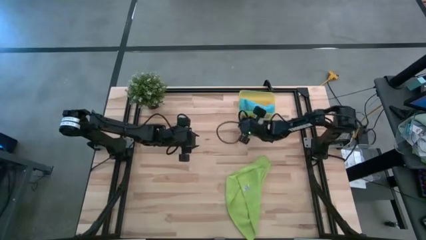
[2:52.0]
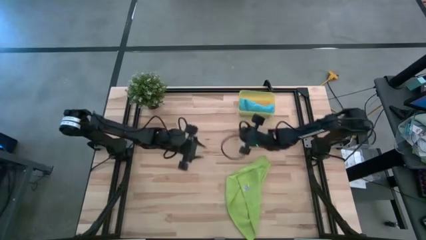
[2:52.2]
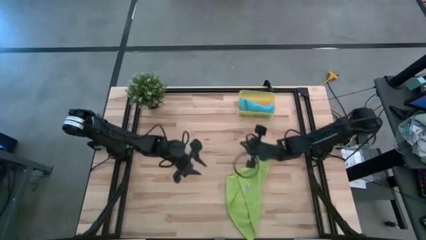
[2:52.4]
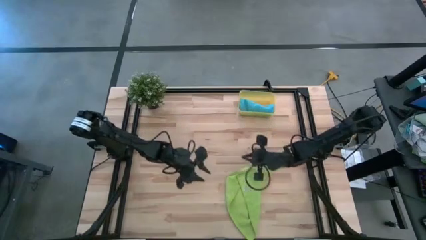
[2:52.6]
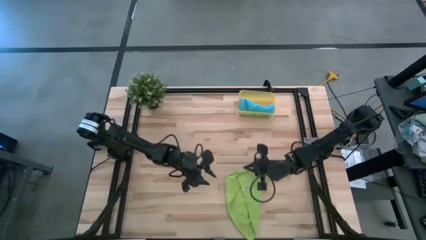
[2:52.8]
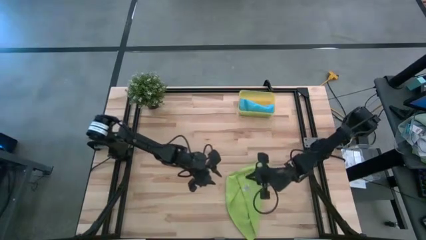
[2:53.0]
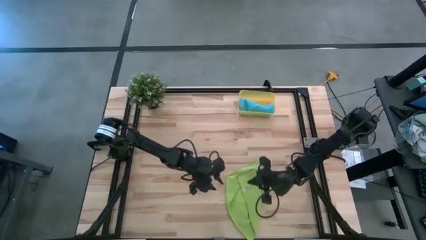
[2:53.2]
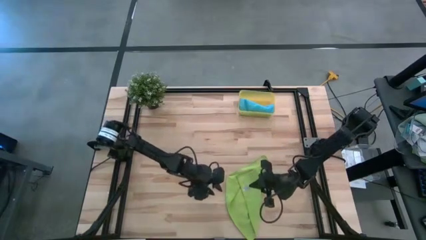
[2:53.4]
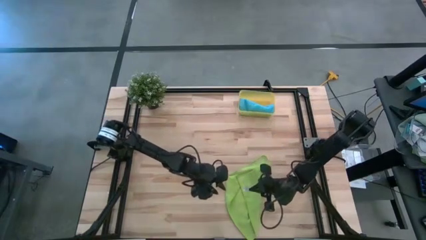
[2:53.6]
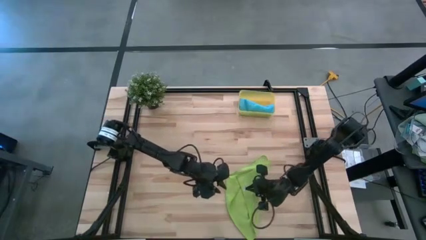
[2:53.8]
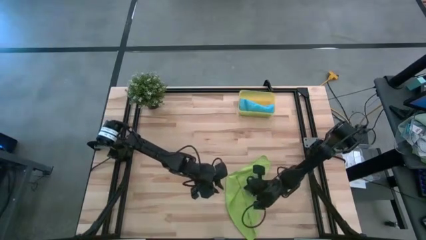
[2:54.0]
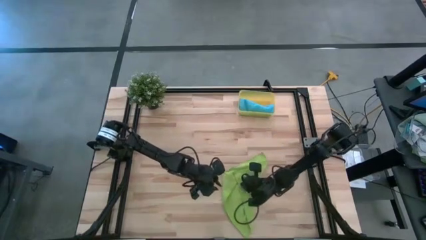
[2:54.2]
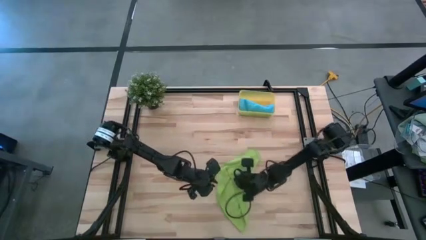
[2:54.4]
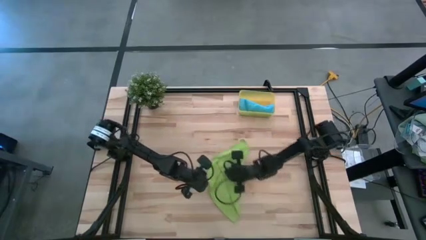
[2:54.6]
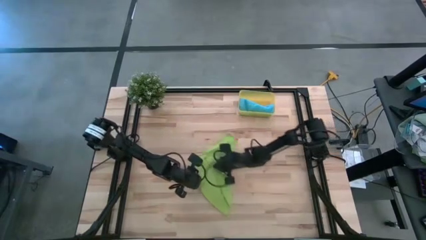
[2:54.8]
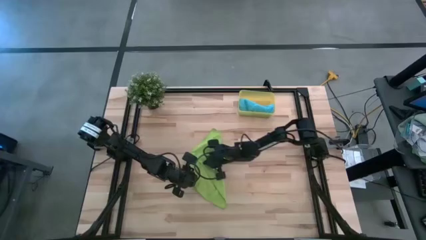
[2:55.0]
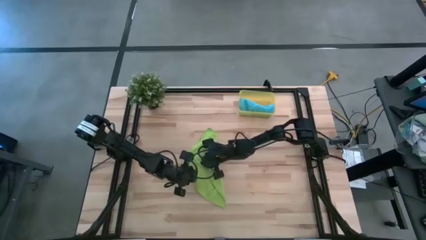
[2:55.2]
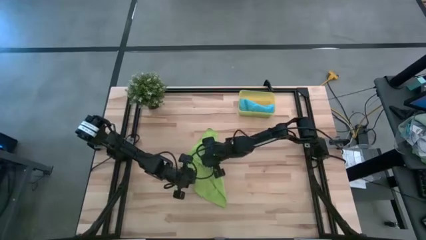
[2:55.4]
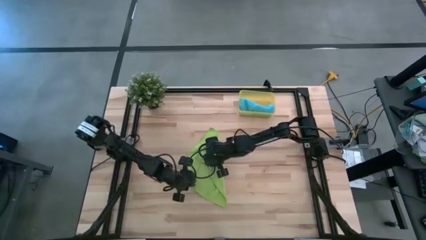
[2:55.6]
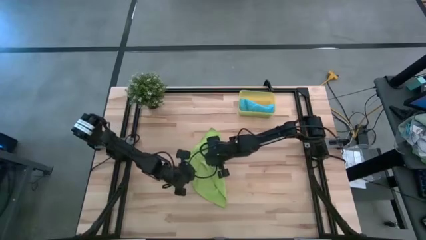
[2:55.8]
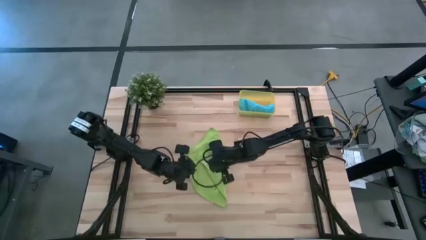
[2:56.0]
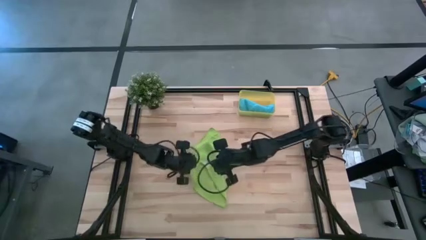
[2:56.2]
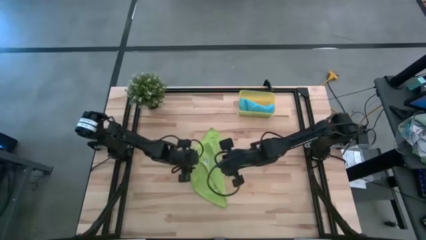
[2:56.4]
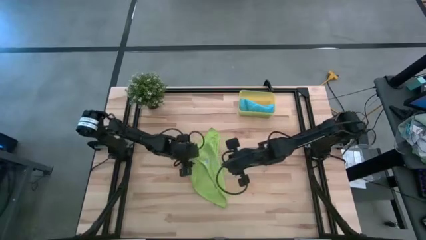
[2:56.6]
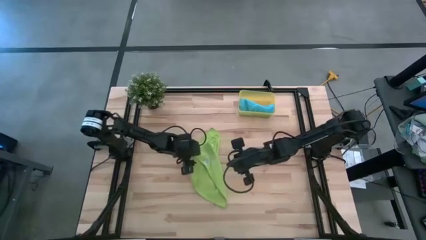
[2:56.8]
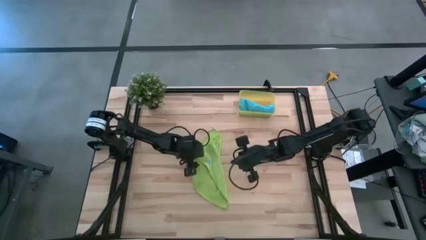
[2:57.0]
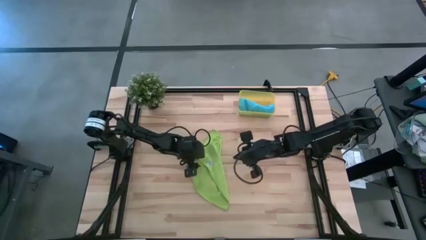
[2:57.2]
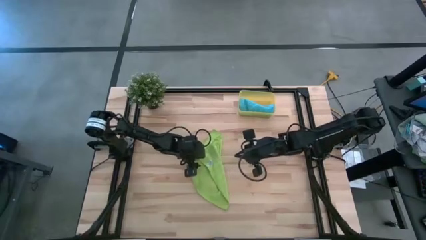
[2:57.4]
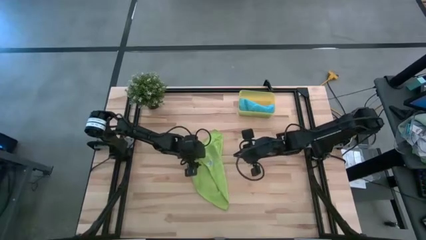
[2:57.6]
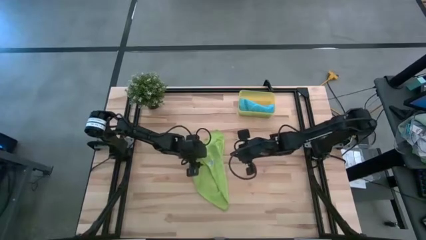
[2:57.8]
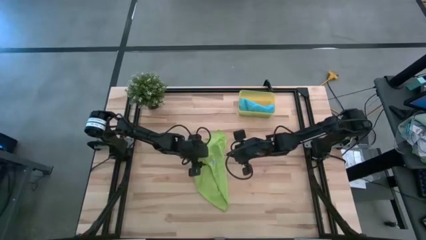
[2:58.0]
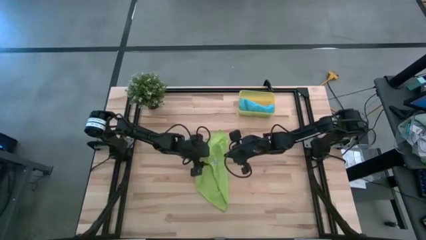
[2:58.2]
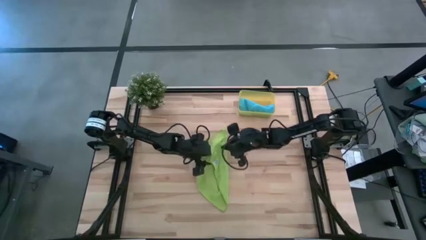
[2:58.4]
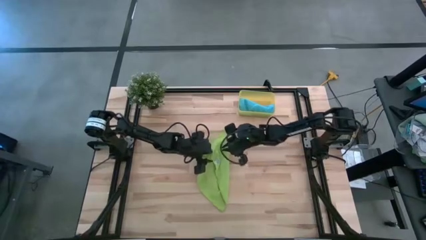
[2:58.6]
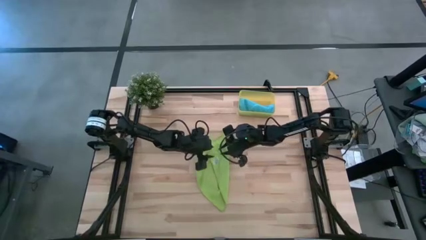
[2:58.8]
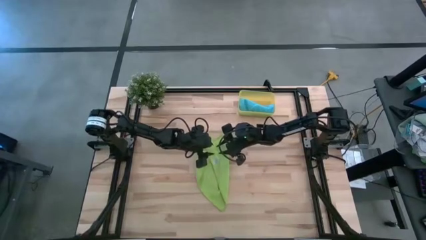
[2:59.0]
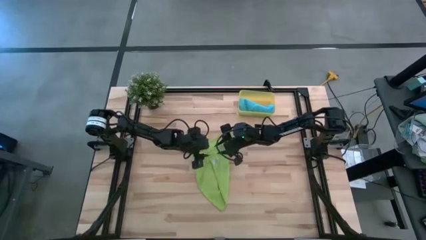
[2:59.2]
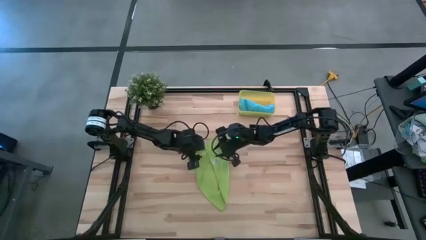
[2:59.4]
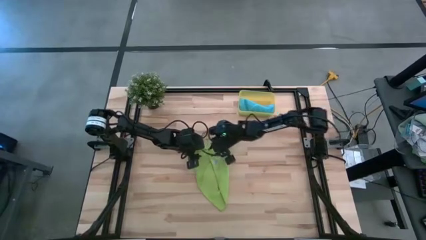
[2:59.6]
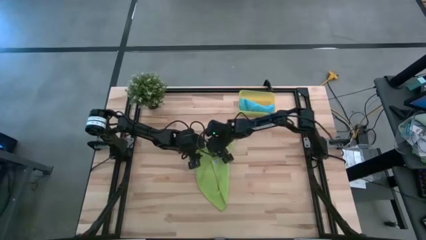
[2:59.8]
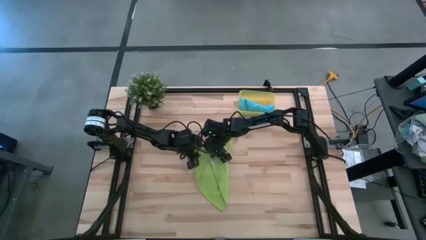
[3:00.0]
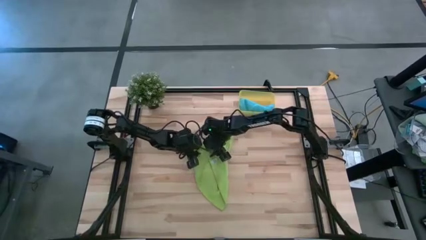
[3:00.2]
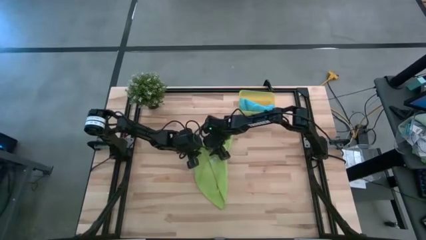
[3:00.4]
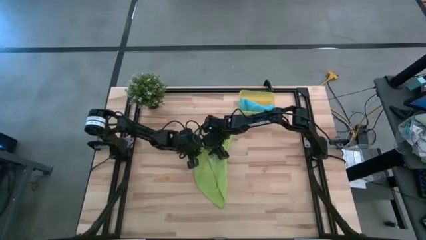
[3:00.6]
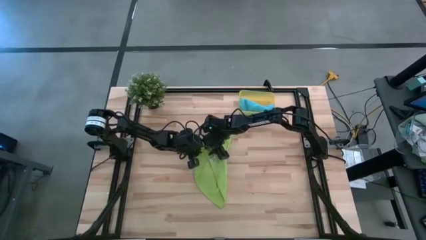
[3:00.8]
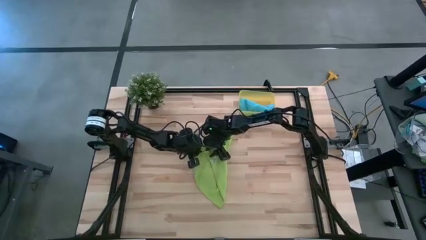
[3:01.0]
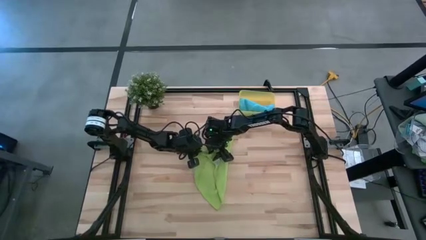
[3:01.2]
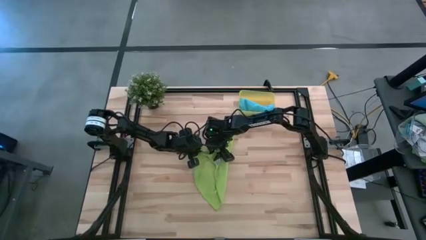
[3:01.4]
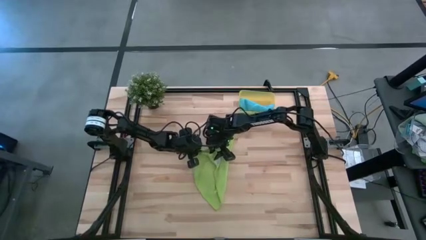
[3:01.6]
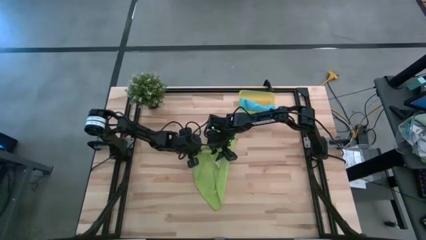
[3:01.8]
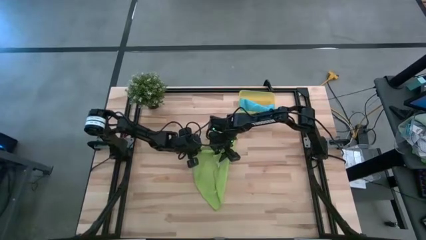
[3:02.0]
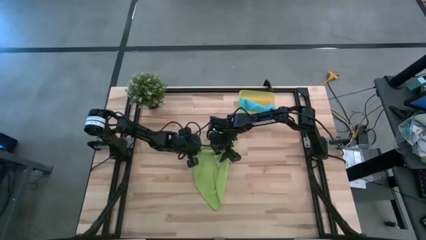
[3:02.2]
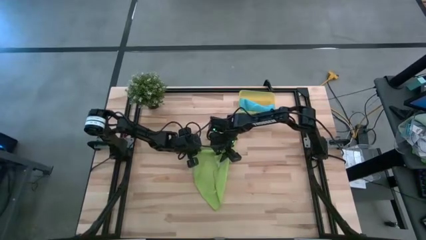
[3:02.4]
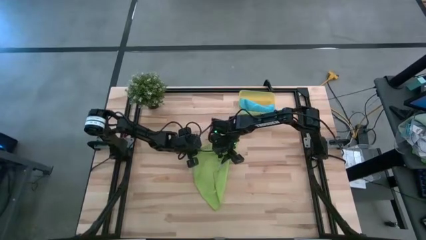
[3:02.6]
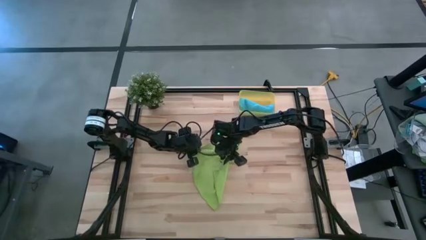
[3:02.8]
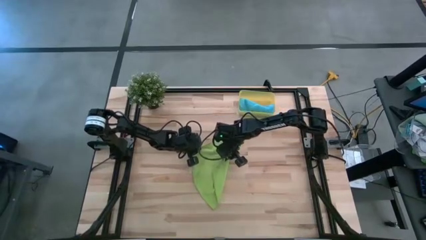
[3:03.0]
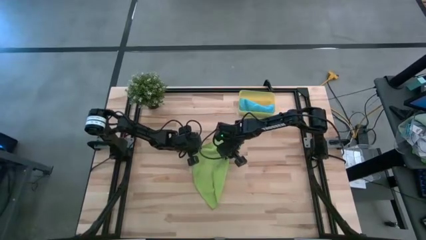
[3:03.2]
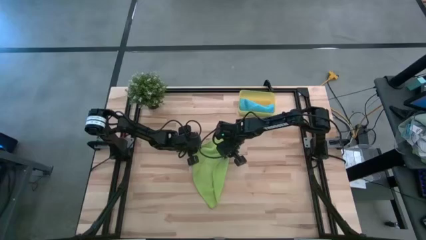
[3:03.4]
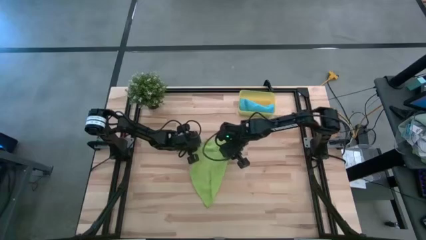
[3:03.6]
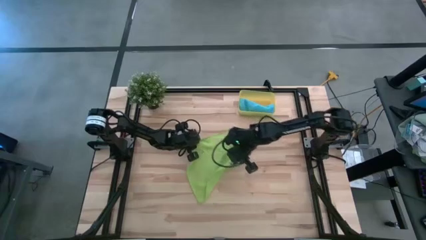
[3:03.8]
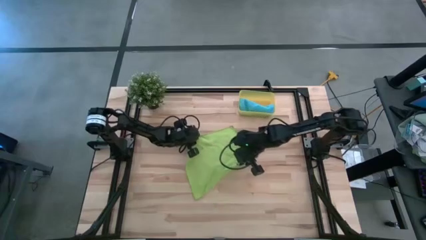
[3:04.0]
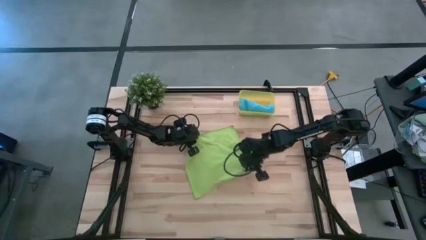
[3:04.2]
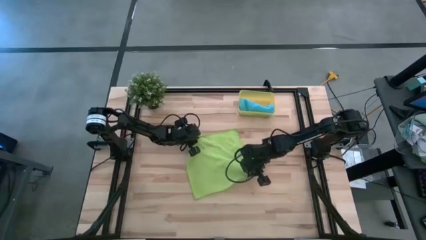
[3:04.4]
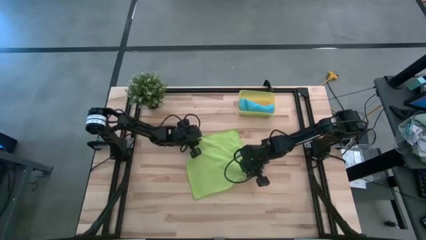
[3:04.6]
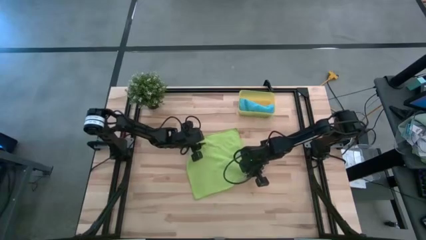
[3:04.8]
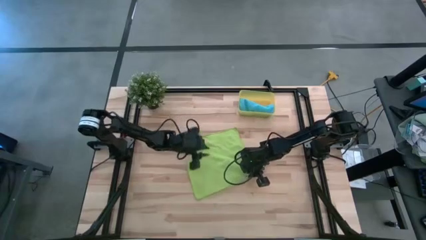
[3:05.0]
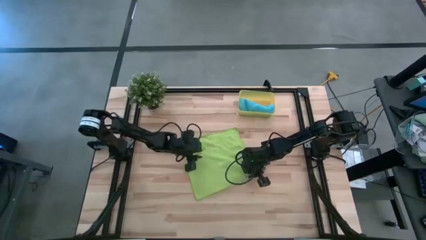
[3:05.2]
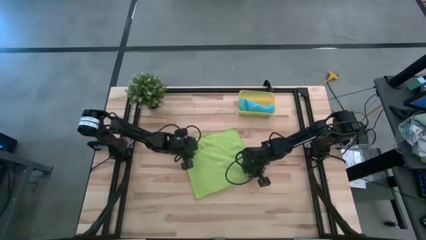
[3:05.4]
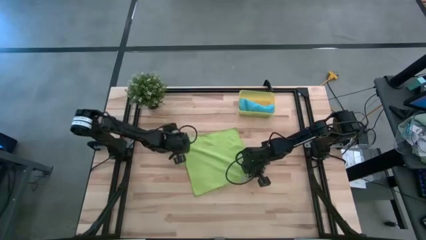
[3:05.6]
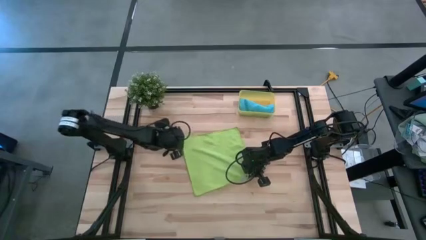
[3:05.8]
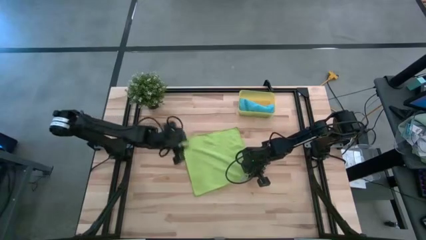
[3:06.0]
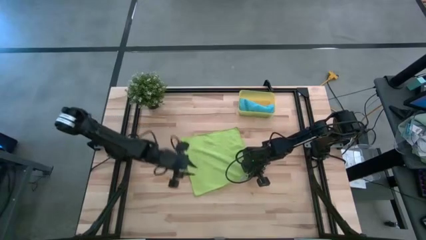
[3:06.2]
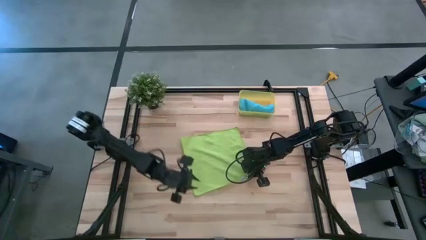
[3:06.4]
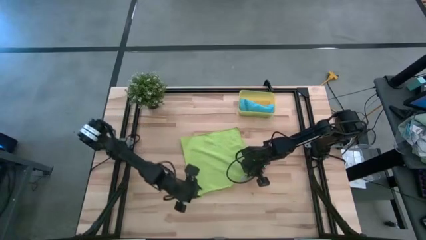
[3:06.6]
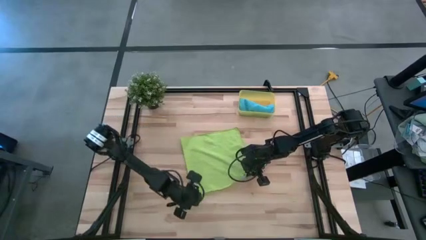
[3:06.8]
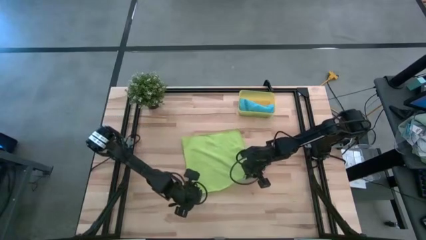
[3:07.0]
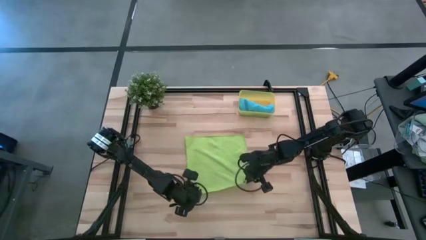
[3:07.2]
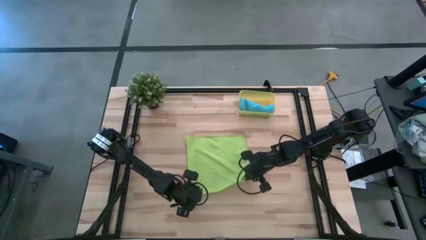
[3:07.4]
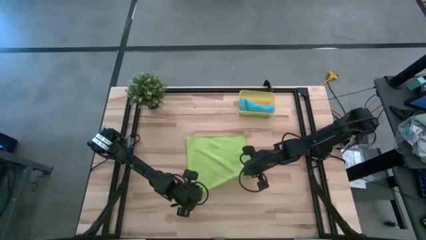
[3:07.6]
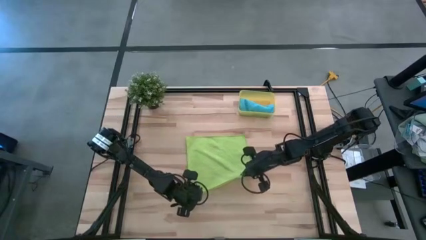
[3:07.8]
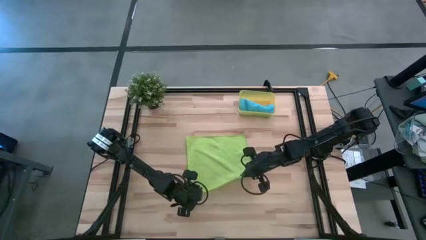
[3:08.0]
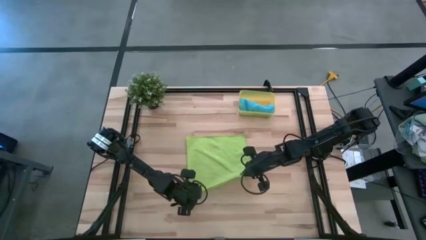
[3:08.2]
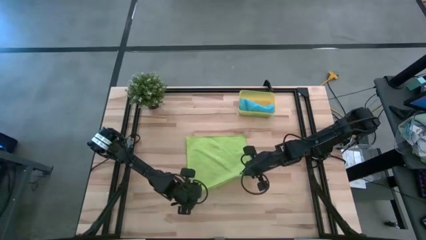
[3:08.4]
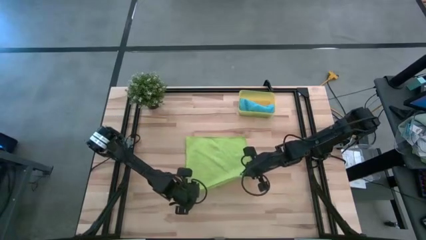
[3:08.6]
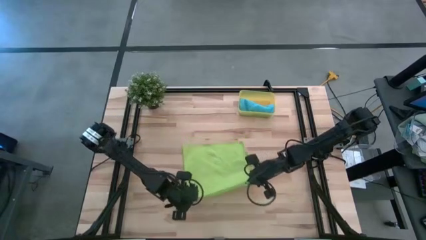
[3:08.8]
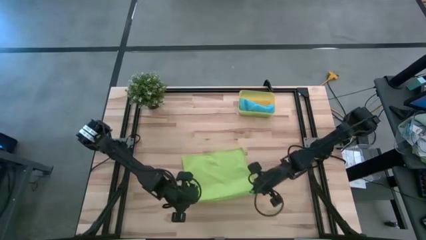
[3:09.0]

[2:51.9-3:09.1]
Task: Roll microfiber towels into tight, uniform cylinder then place into a basket
Fold the green microfiber towel
